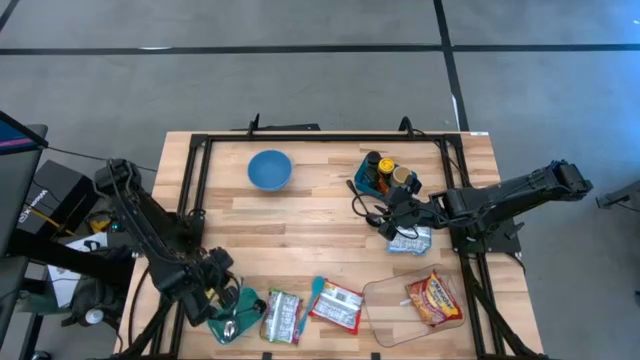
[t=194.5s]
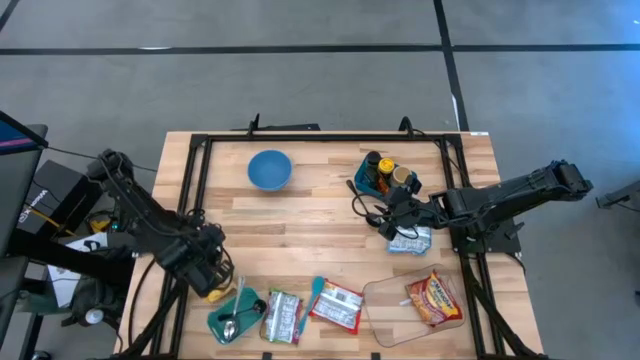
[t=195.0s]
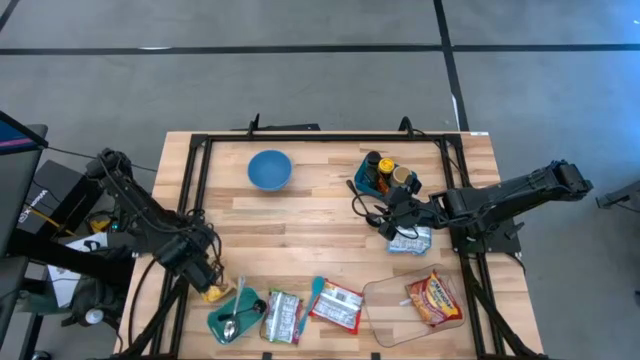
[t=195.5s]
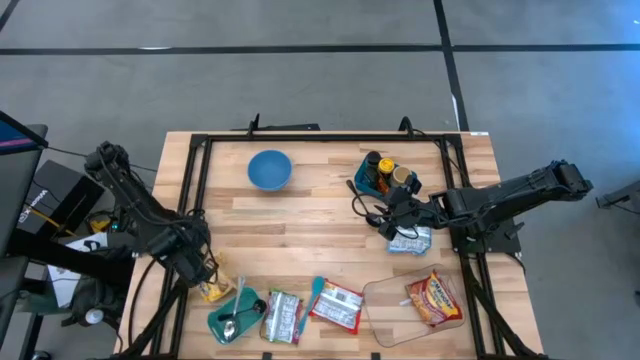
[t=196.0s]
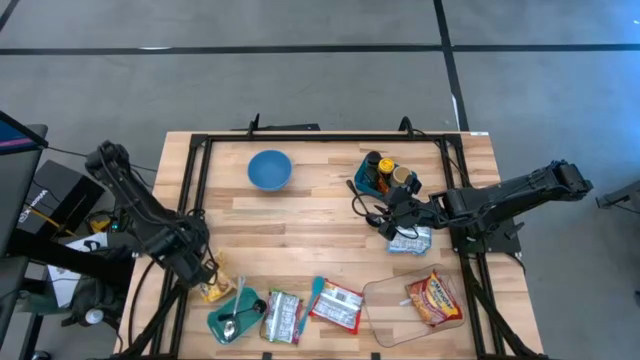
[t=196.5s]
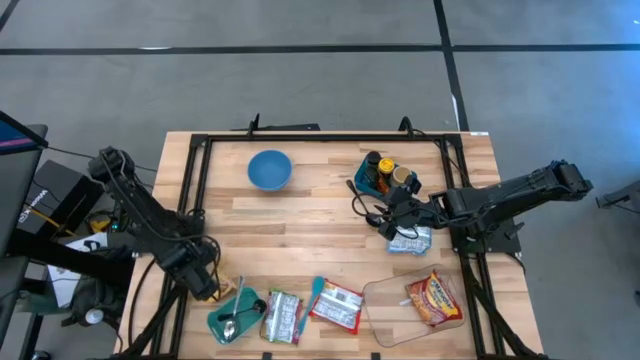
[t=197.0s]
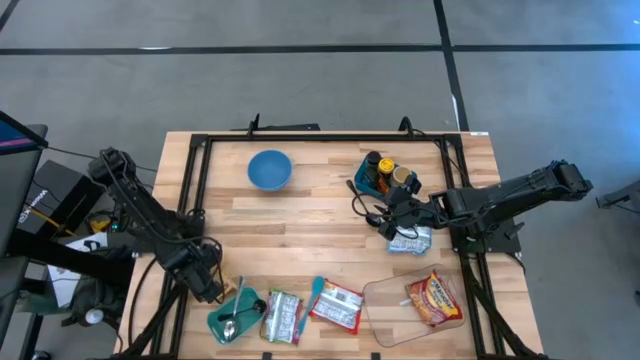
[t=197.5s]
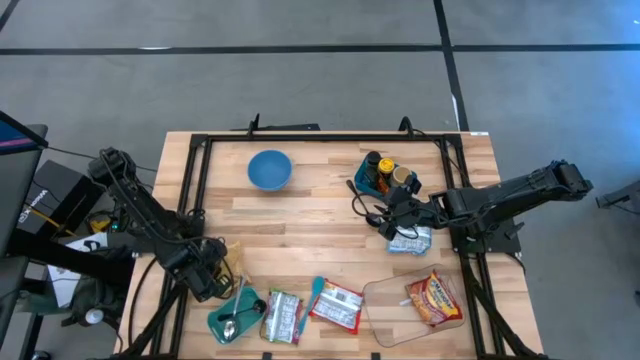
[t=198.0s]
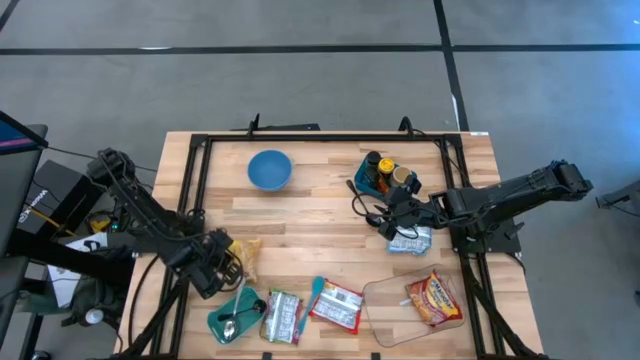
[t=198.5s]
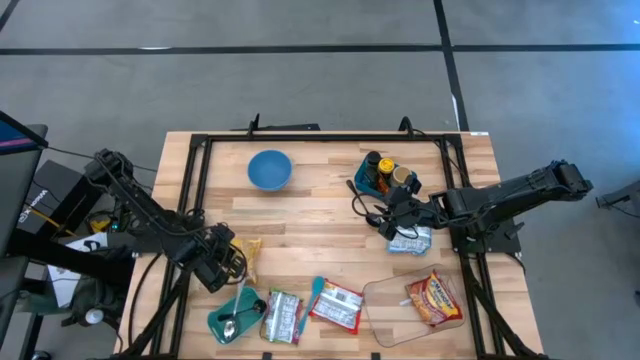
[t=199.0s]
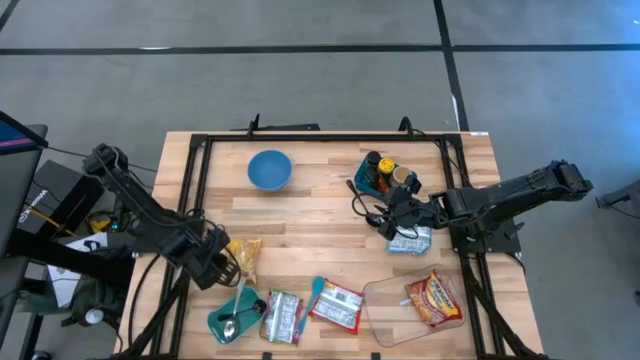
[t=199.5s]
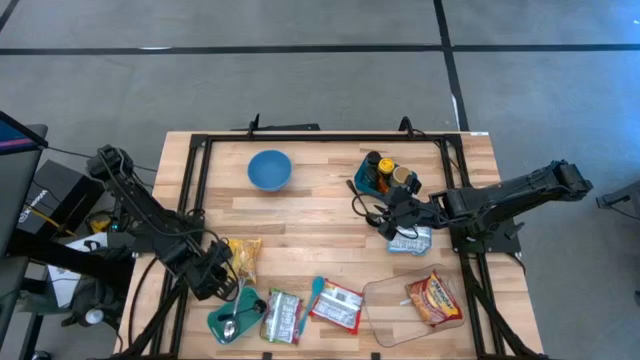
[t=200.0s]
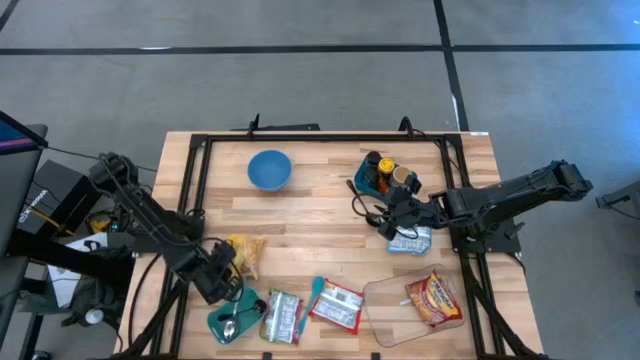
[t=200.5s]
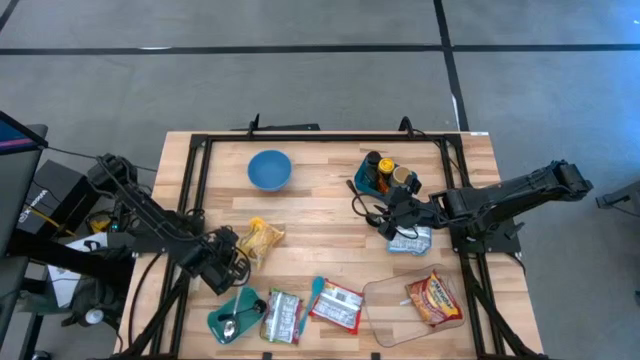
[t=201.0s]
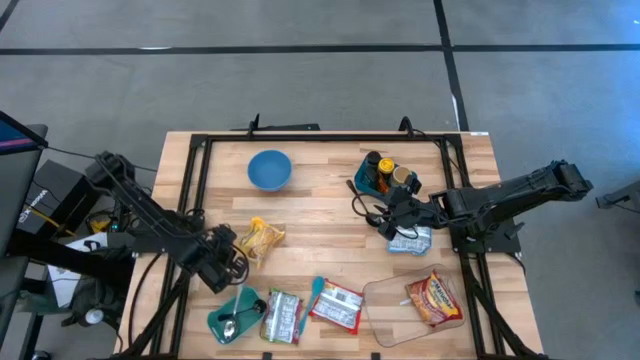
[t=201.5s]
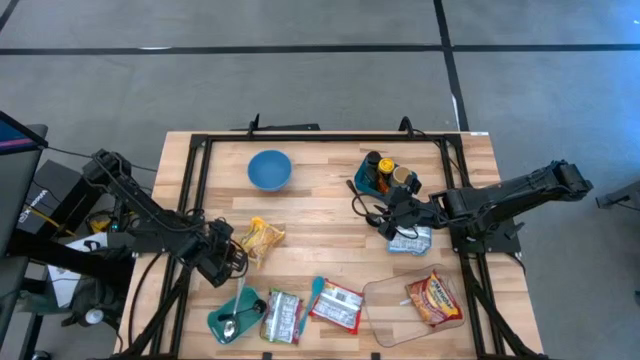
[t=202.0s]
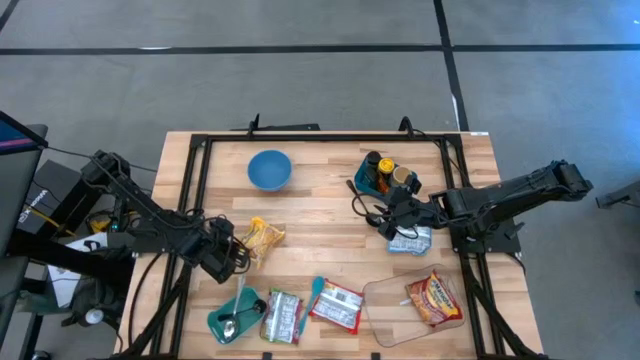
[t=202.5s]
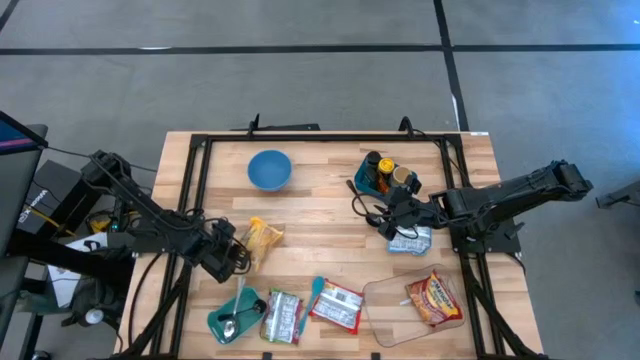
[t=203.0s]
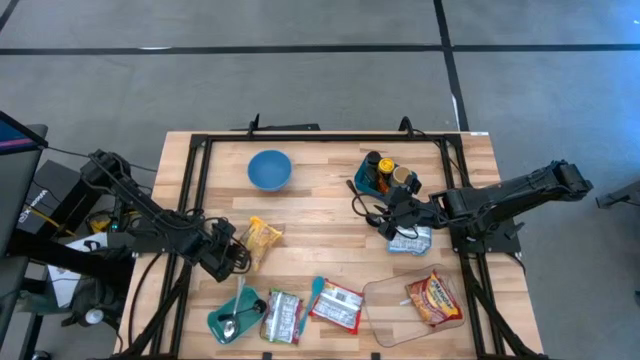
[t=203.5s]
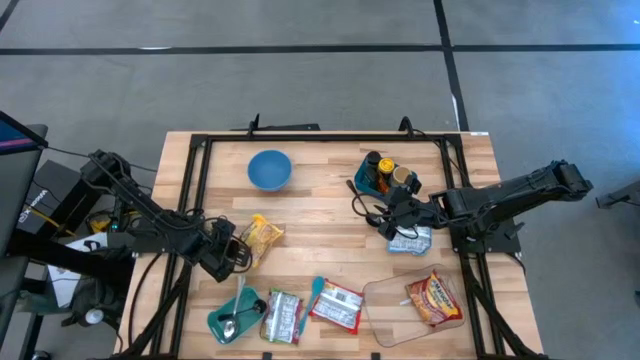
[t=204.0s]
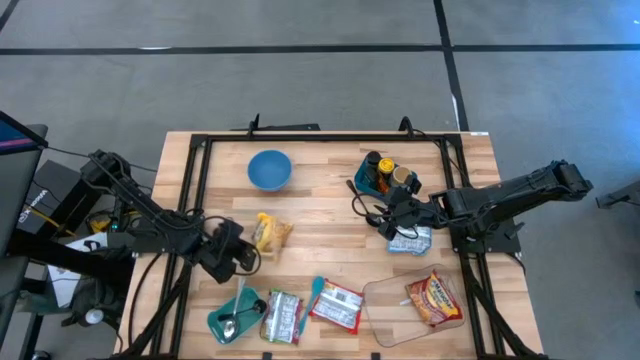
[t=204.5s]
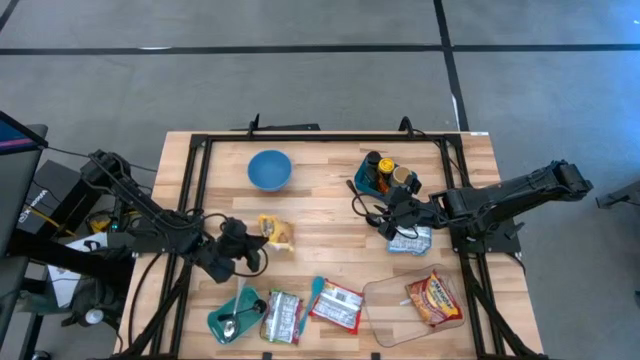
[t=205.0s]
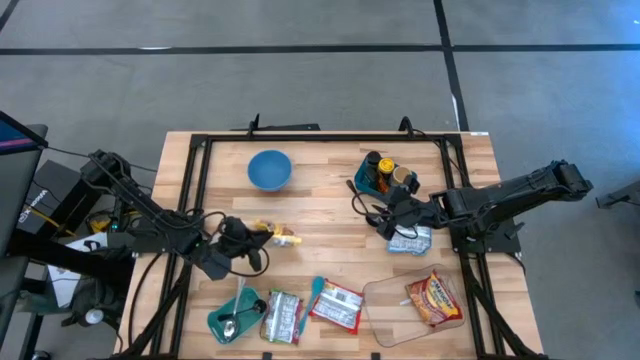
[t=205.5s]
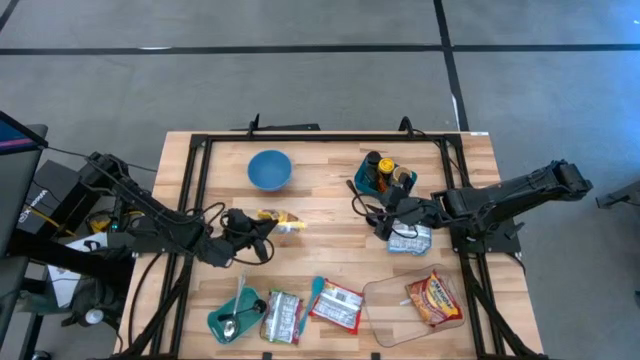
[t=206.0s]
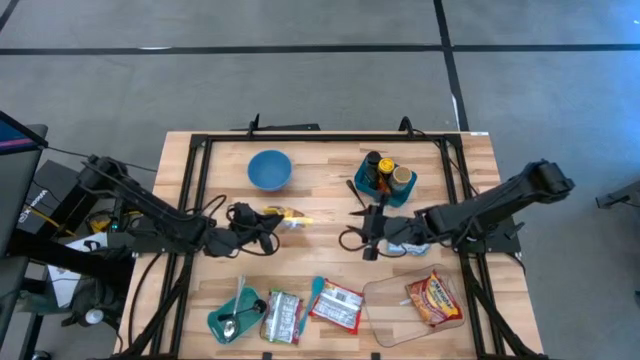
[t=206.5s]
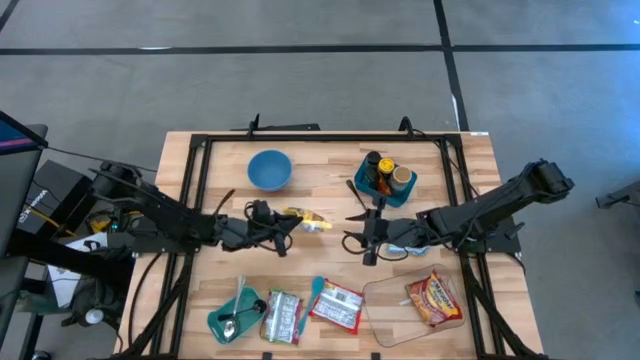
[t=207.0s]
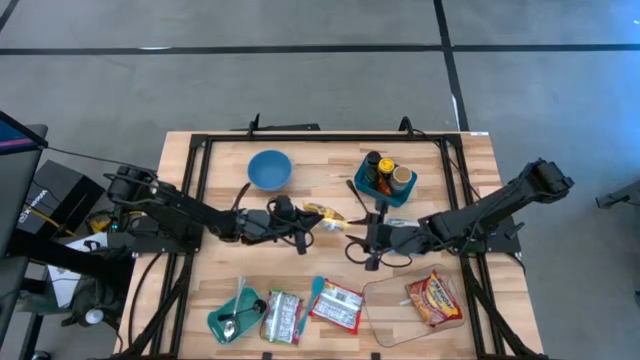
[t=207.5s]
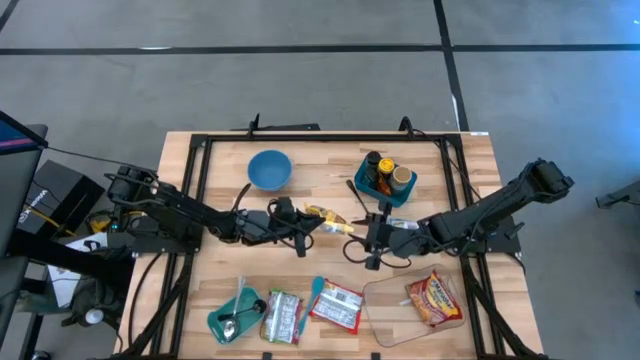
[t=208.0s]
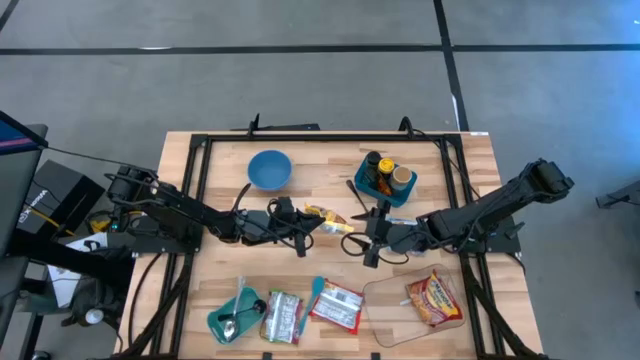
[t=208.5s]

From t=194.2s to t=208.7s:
Task: Pick & Place Food Item
Put the yellow noodle pack into the transparent bin

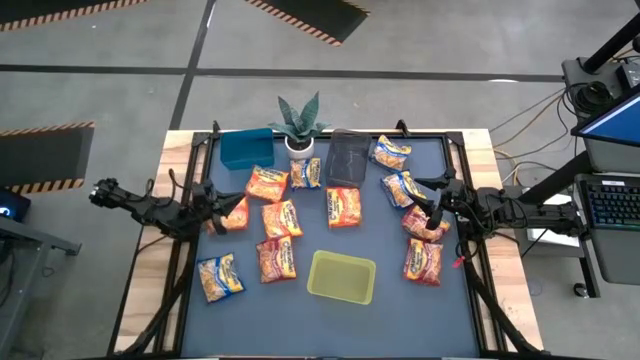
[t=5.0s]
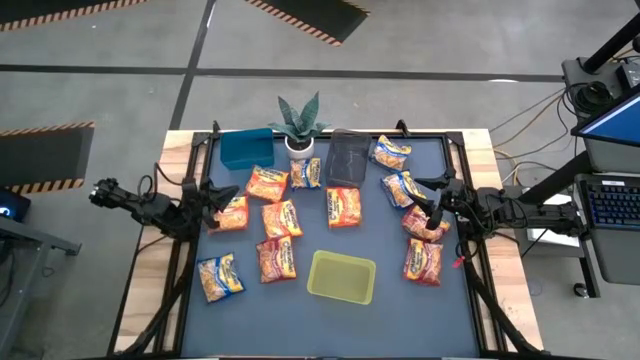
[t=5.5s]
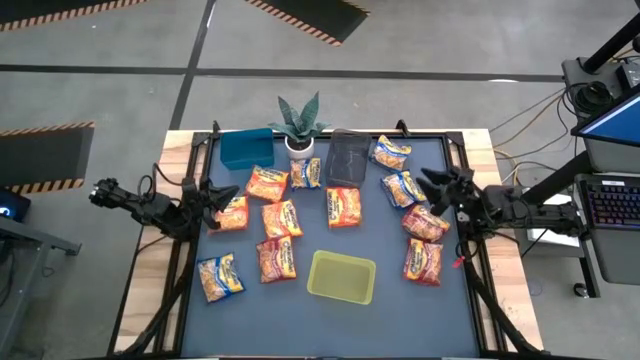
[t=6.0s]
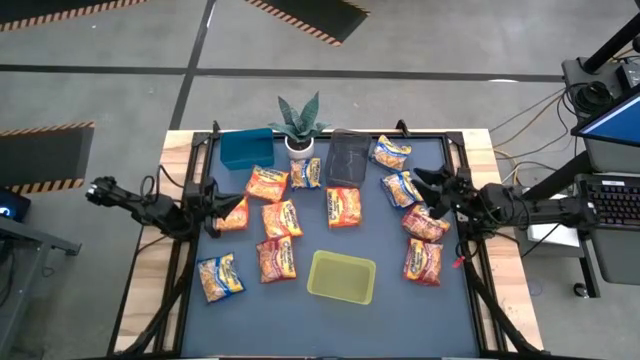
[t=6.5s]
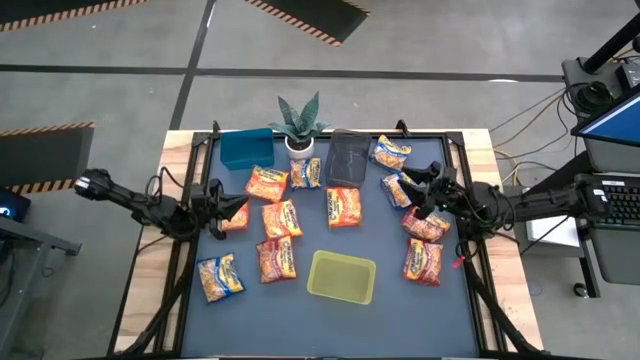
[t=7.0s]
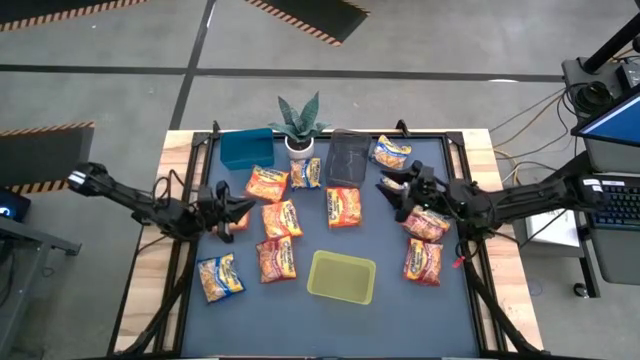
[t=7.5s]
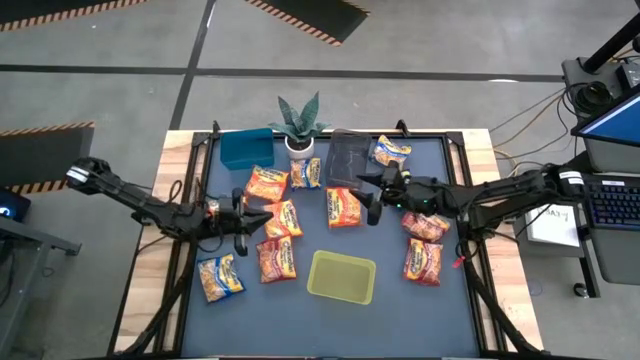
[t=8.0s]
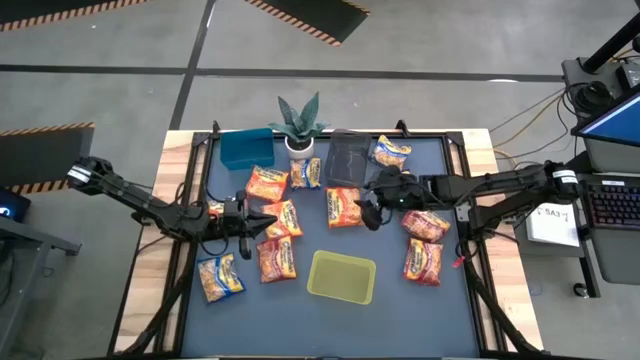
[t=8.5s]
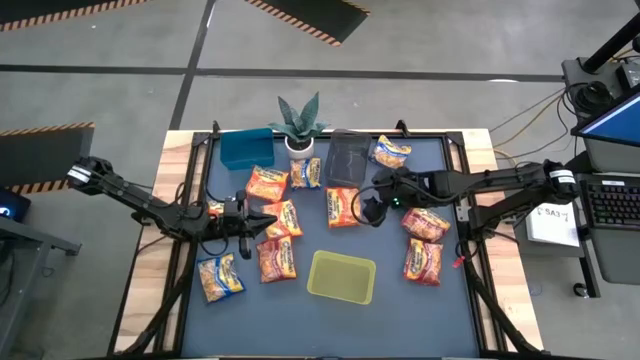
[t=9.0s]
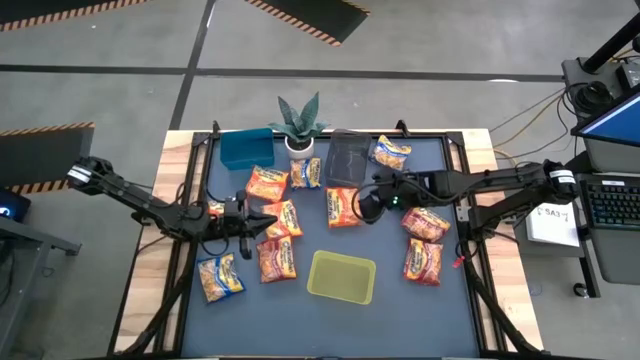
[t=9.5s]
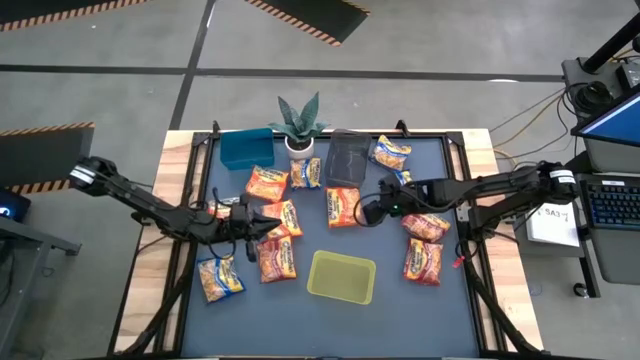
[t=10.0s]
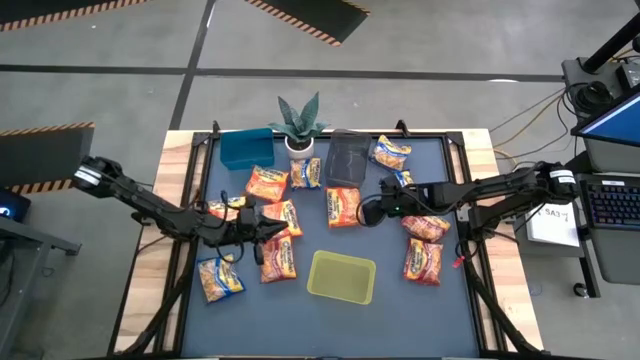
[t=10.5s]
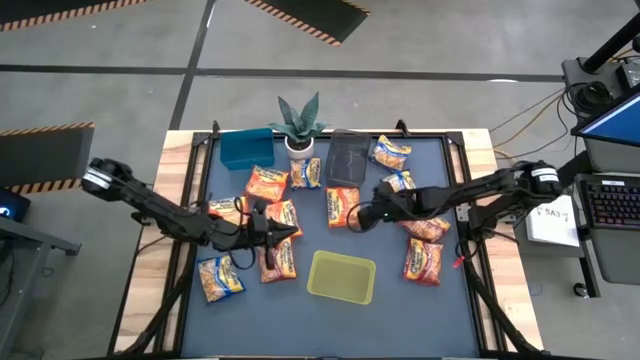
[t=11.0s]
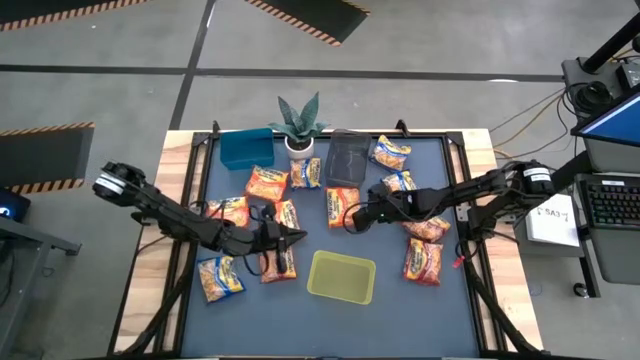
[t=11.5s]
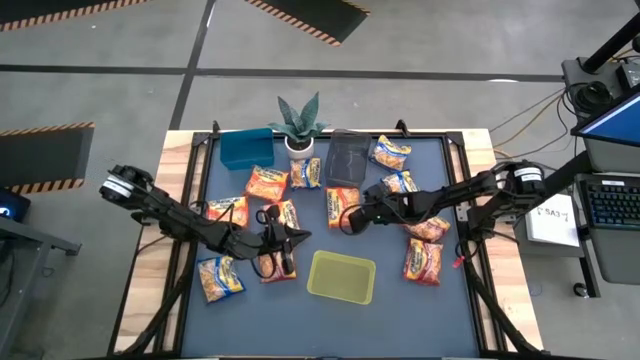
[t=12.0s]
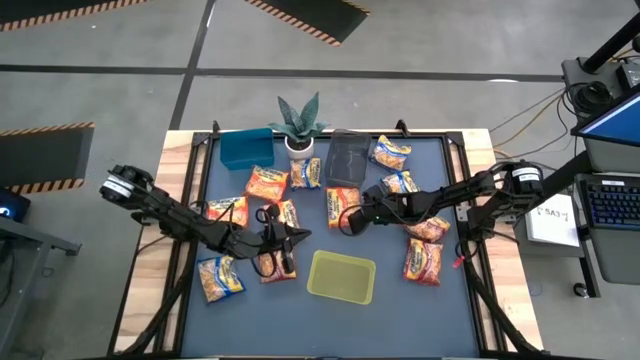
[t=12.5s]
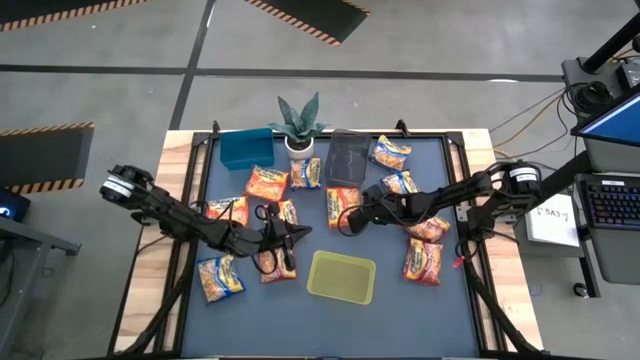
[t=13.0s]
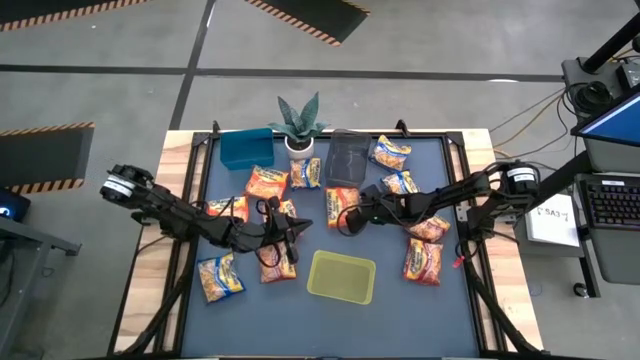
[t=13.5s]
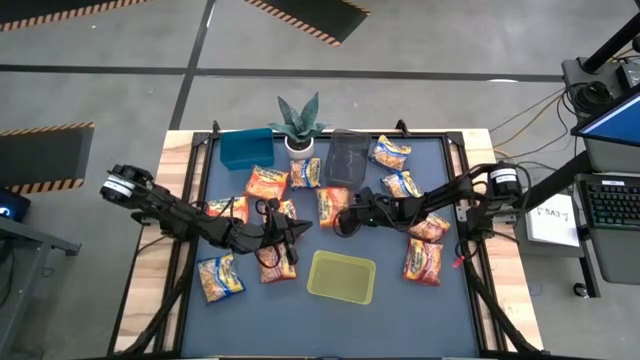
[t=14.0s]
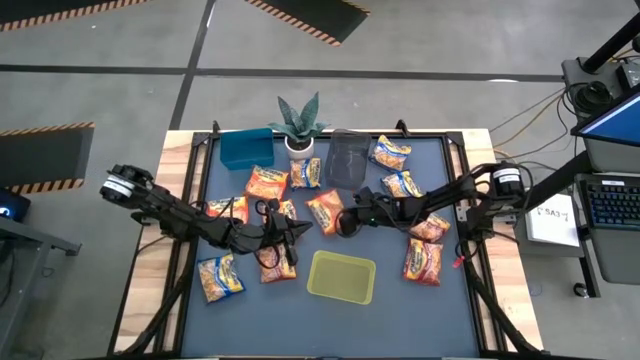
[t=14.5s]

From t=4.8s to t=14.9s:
Task: Sort Maruchan noodles
Put the orange bag into the black bin
